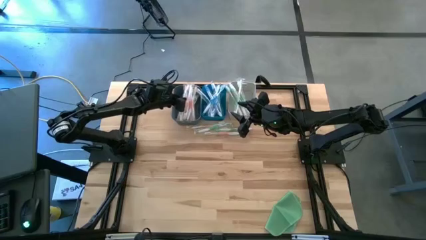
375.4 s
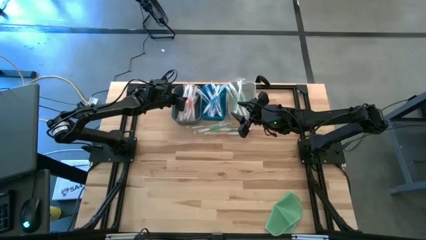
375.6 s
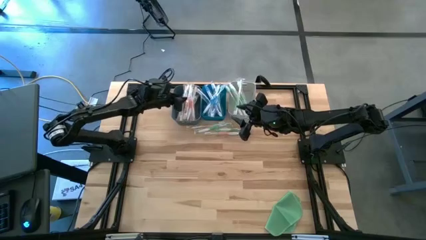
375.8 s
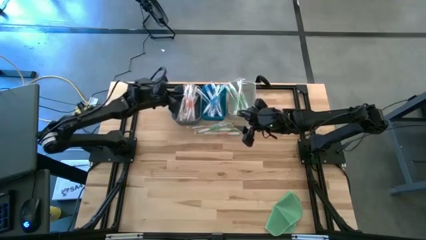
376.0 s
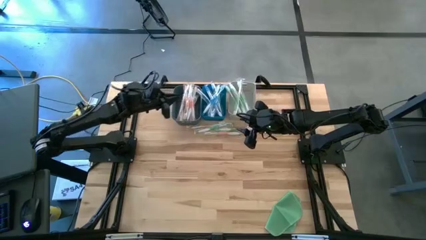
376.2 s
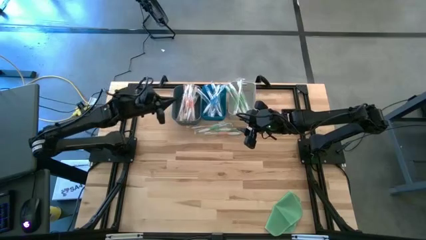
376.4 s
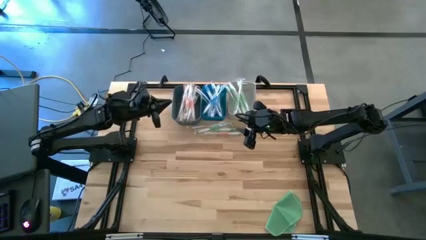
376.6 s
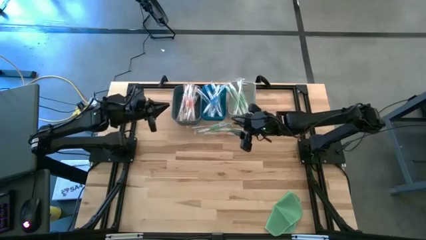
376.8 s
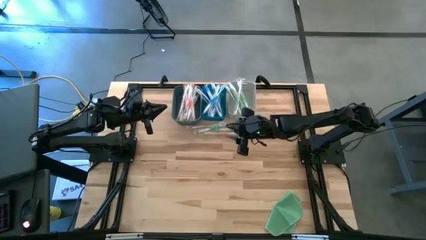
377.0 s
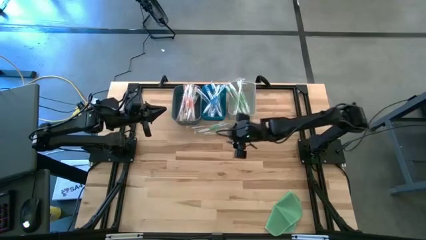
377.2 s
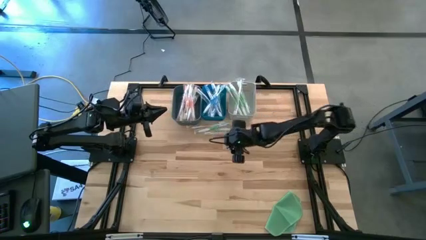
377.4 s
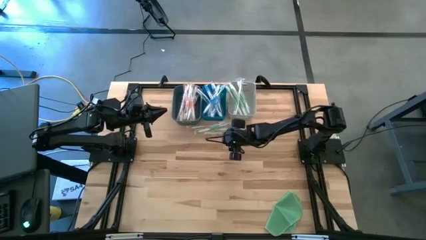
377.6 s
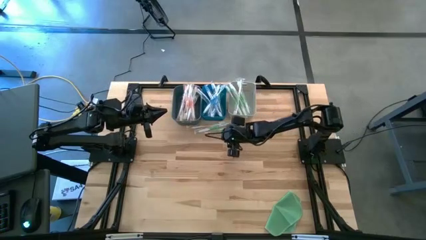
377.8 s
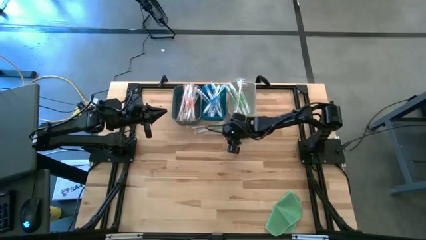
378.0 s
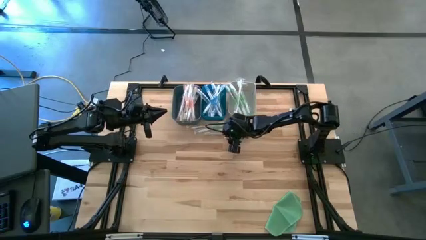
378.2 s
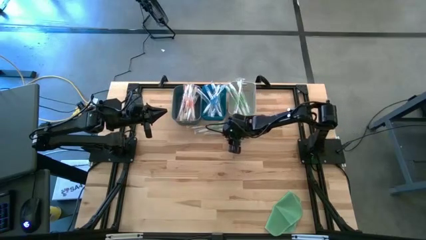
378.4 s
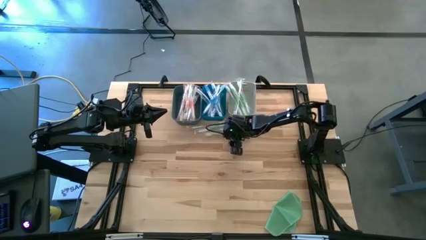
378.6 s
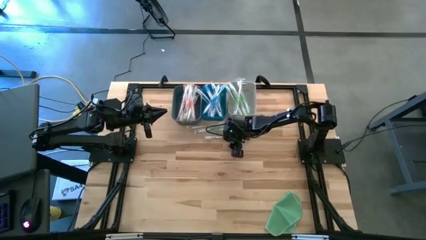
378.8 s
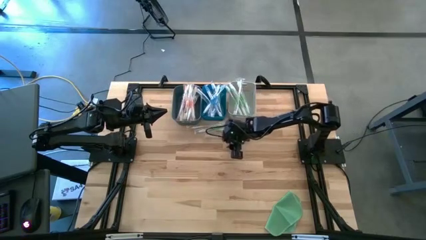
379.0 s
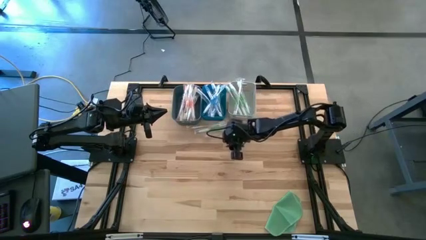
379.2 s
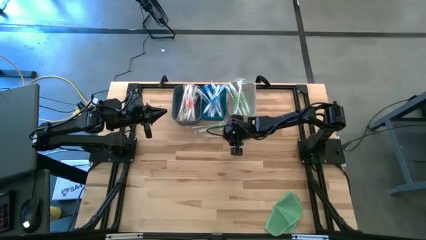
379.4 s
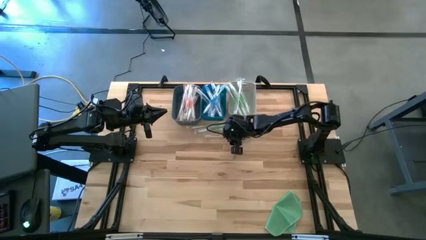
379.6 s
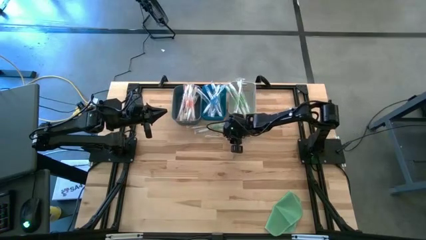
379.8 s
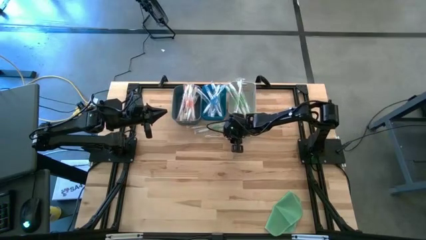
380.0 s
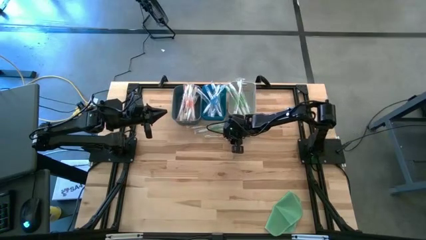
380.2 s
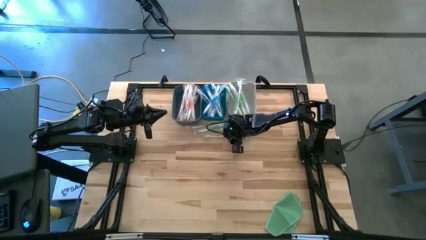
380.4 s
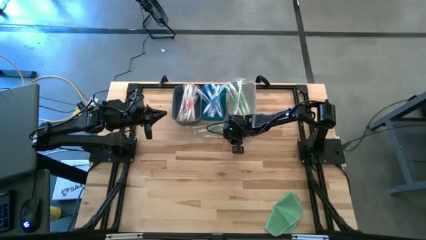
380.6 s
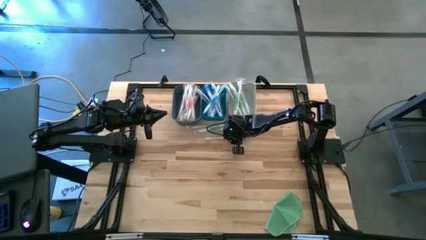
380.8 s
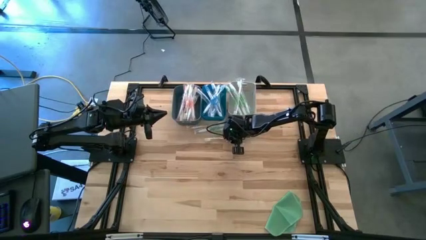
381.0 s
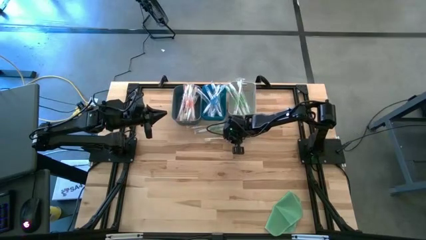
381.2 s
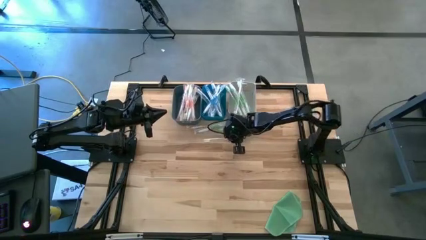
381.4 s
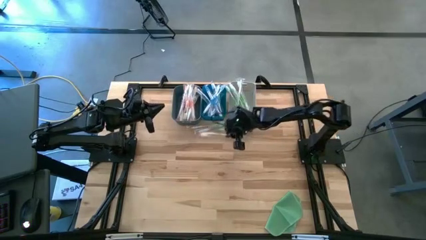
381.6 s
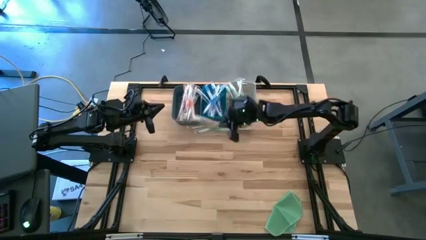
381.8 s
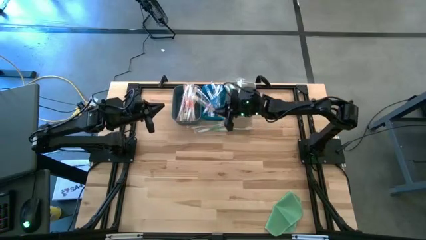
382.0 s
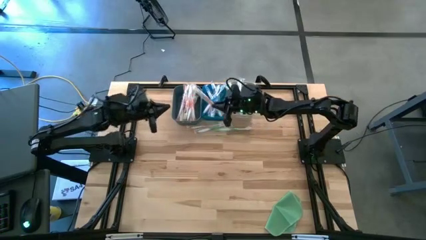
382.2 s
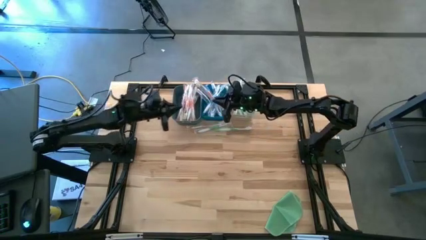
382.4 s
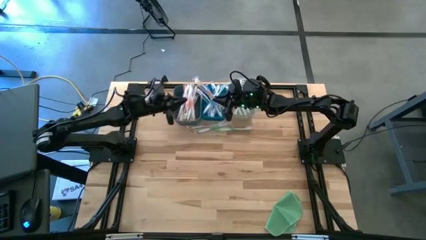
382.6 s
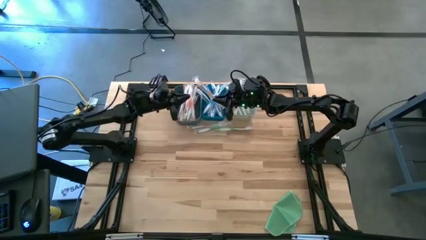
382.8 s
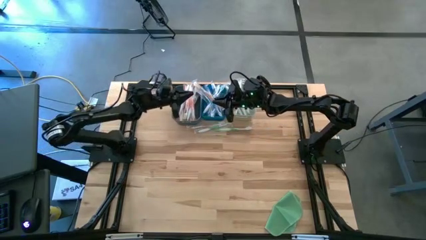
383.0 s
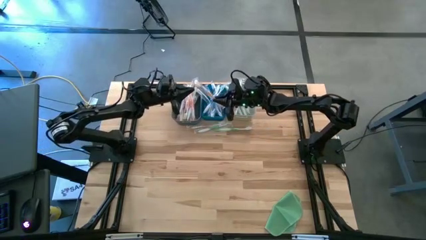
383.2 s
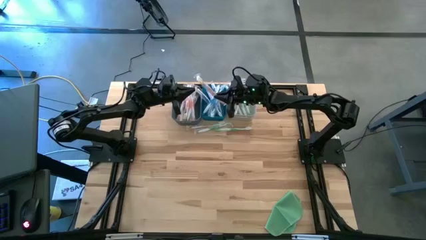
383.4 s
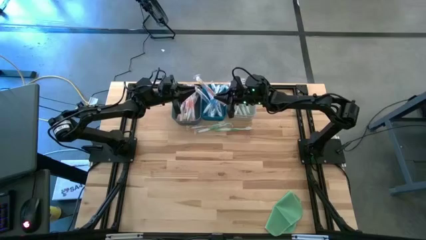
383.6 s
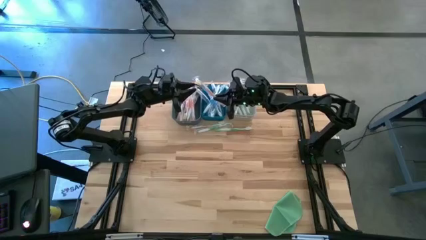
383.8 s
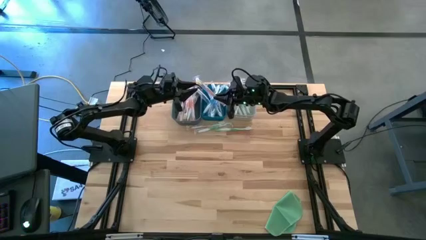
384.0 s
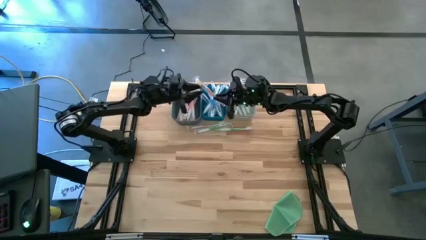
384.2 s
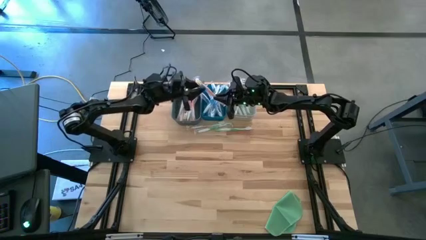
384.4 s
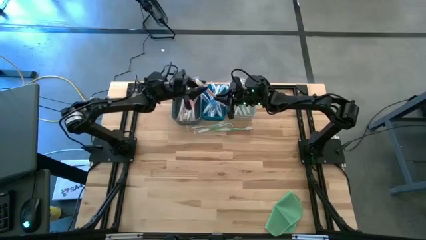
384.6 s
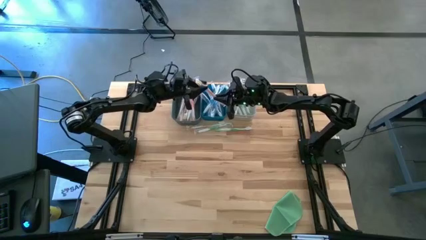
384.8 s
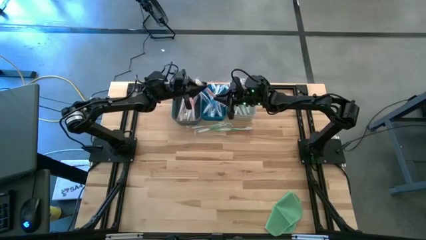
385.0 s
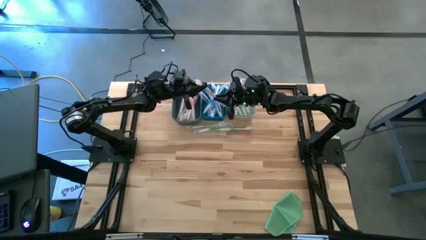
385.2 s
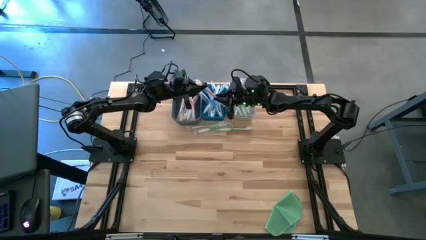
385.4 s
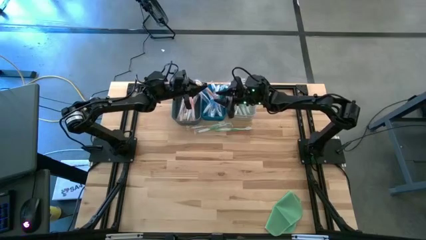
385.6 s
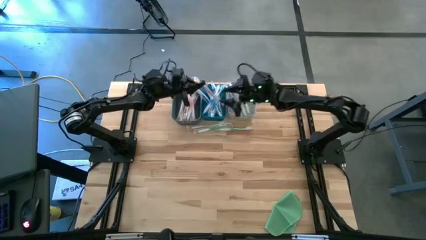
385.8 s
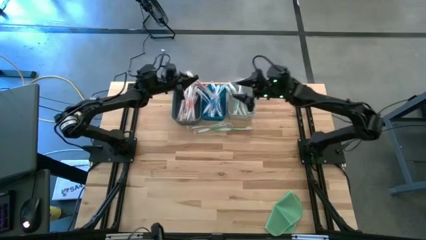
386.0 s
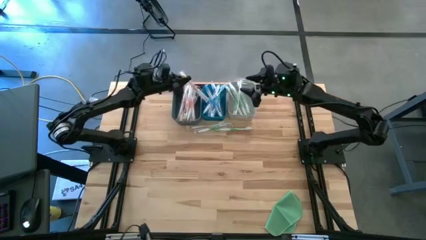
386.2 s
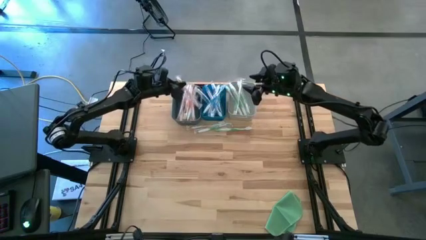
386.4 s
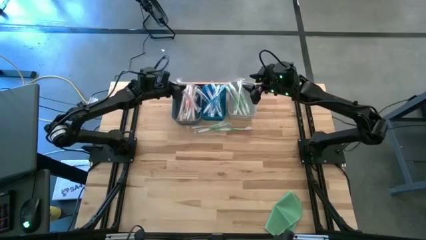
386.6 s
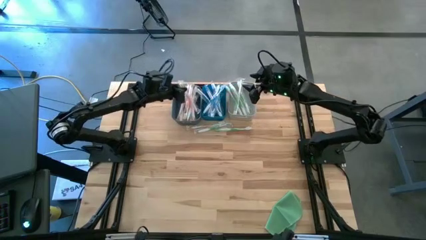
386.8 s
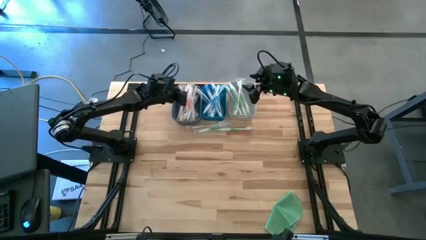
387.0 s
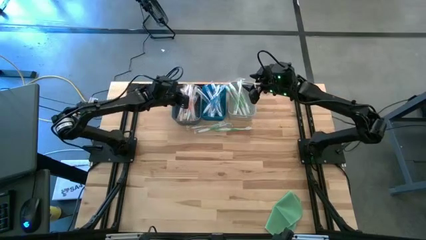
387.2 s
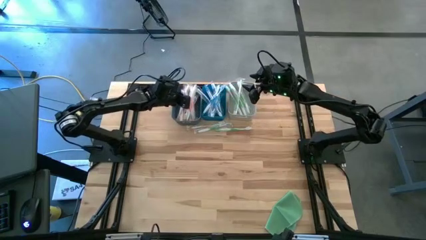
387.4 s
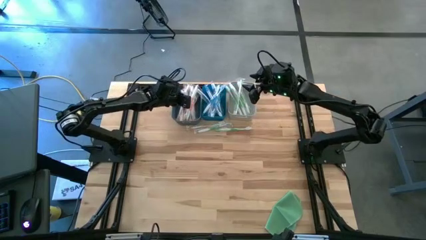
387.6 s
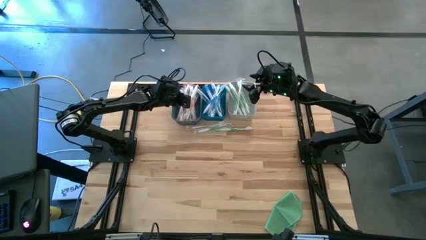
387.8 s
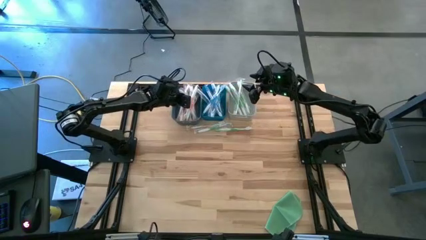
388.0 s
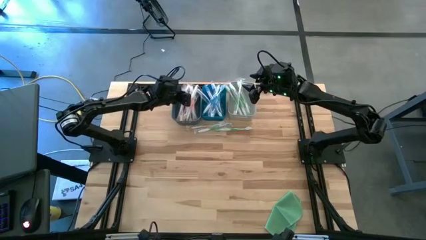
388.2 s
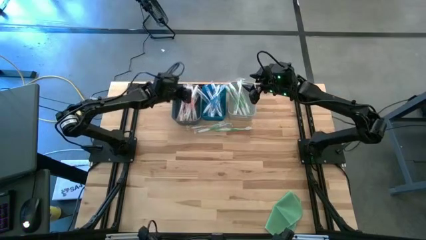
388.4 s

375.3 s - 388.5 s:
Task: Pick & Place Toothbrushes
Put the orange toothbrush into the dark blue bin

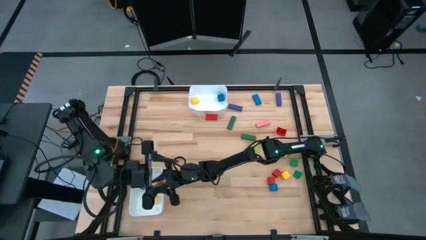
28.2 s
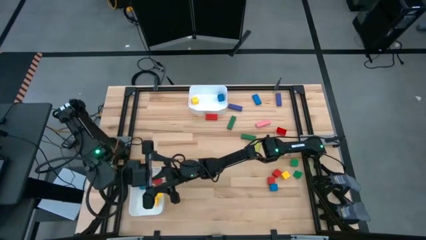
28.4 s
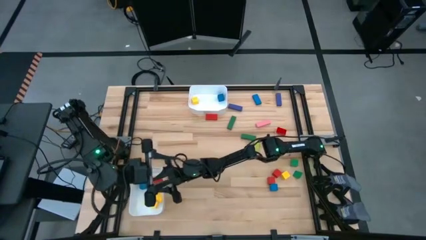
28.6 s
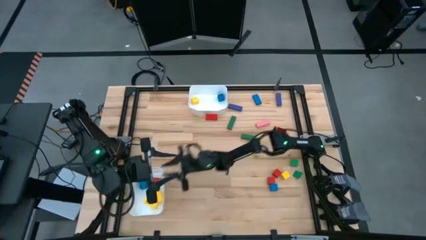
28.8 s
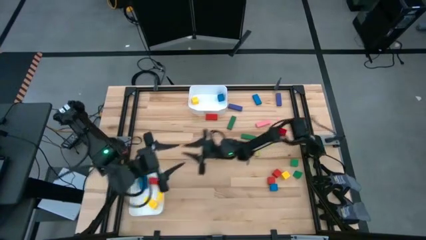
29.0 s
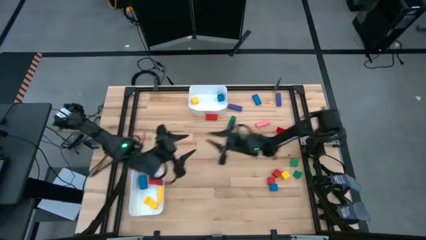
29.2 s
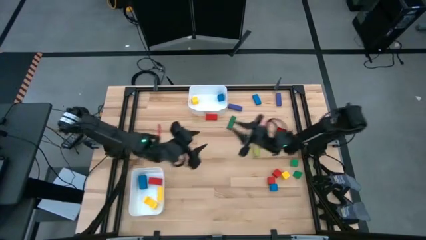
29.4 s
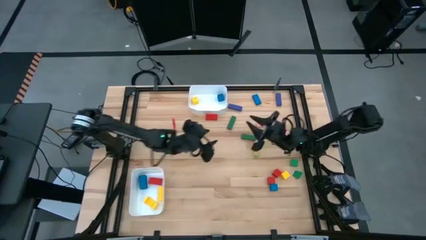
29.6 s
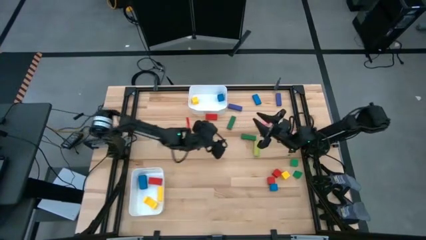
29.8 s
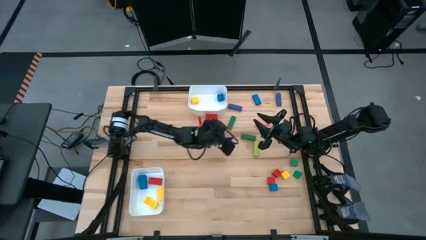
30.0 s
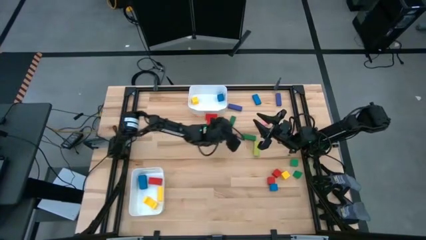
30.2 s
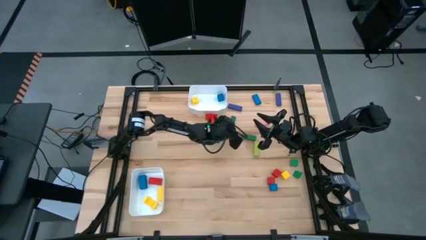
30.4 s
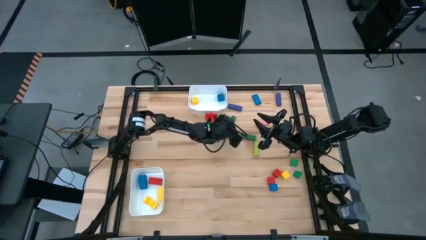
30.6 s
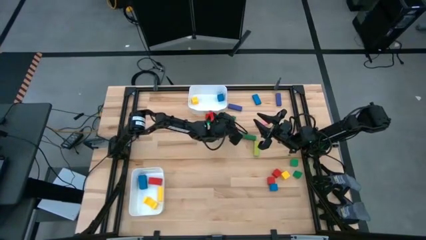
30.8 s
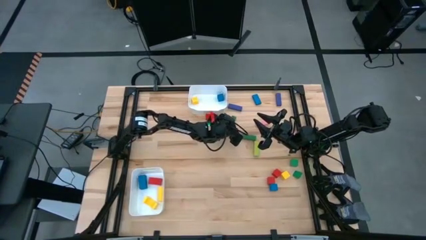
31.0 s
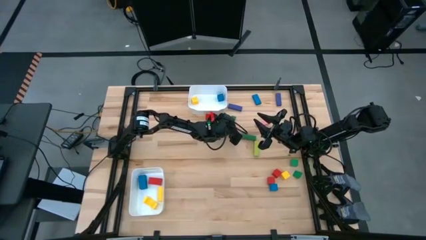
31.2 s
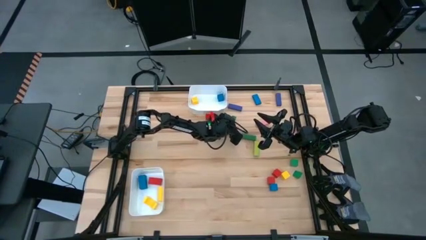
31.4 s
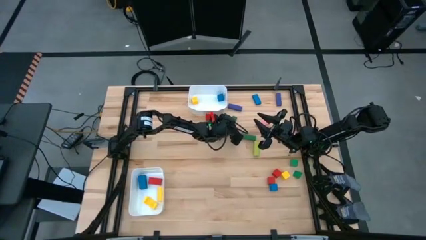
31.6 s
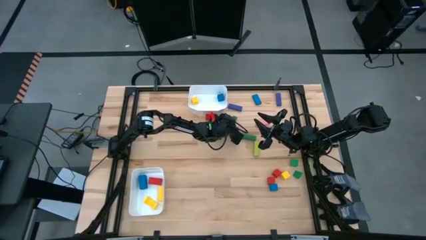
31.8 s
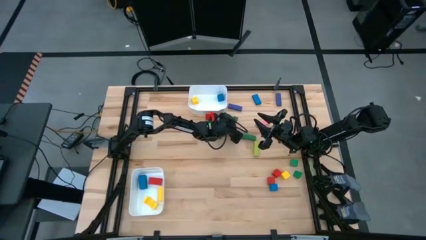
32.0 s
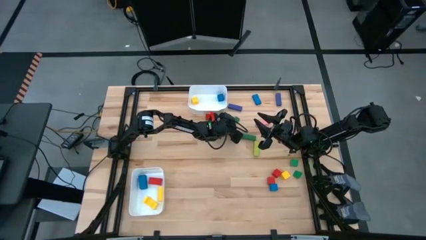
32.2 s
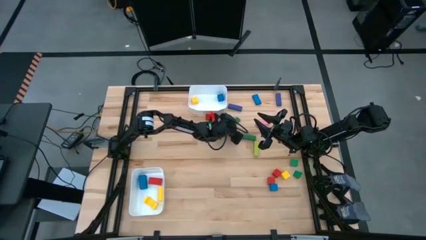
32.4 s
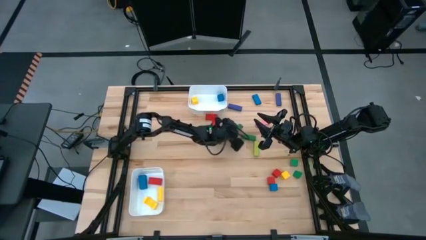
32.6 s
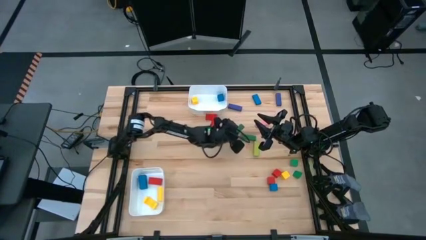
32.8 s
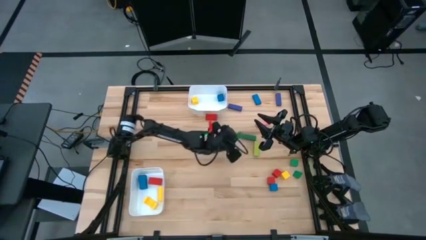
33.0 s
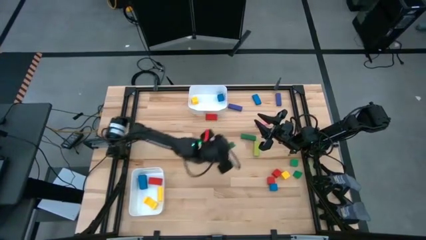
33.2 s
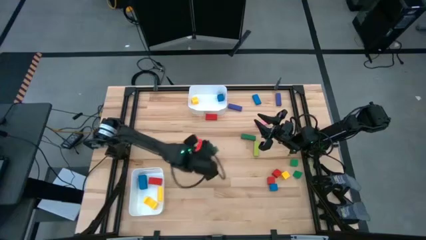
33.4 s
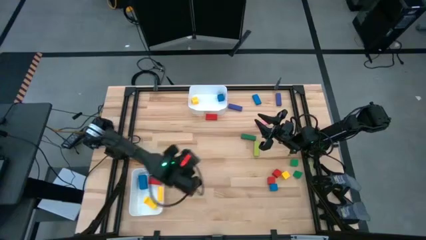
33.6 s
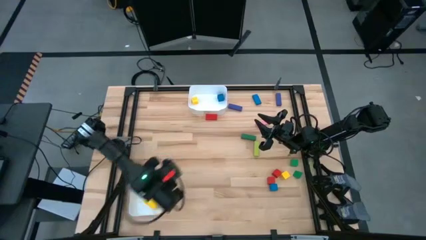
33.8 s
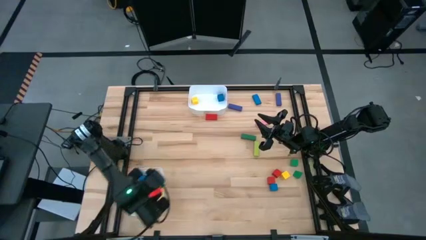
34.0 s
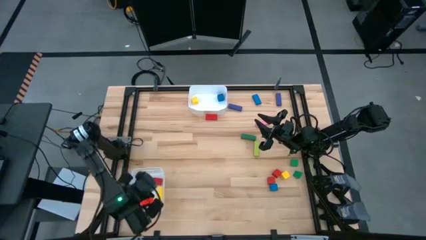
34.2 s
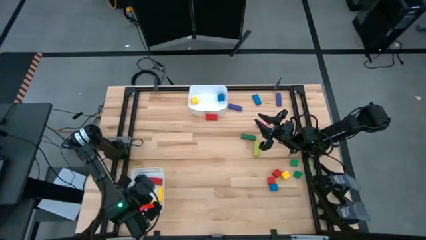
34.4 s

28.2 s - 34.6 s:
Task: Sort blocks by size
Put the green rectangular block into the bottom white bin
